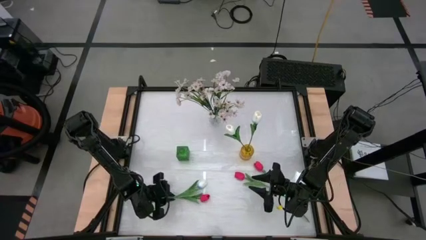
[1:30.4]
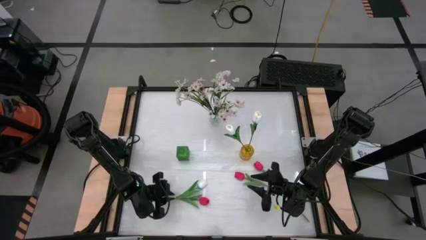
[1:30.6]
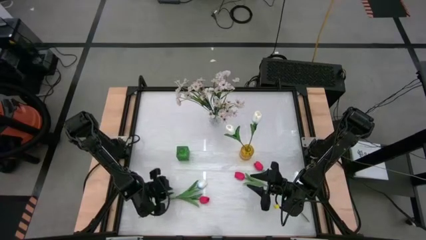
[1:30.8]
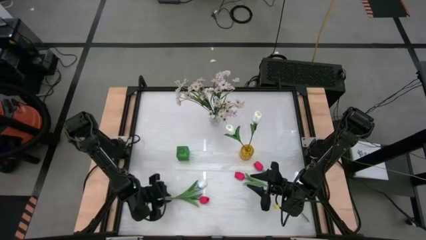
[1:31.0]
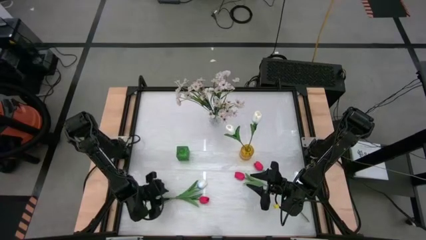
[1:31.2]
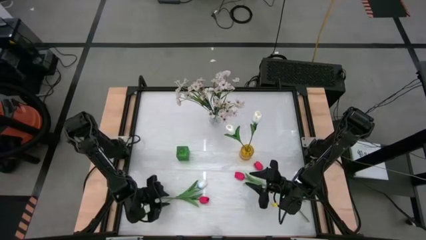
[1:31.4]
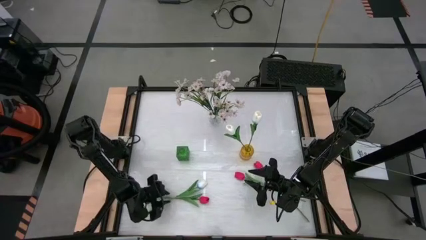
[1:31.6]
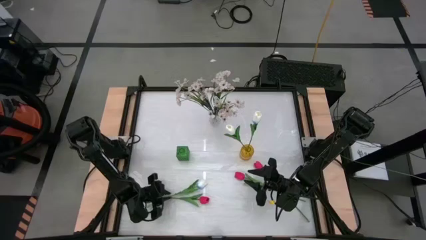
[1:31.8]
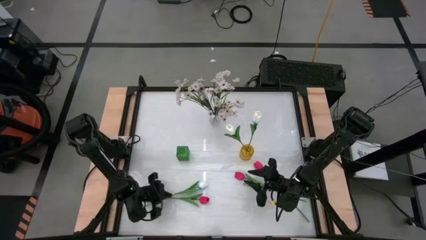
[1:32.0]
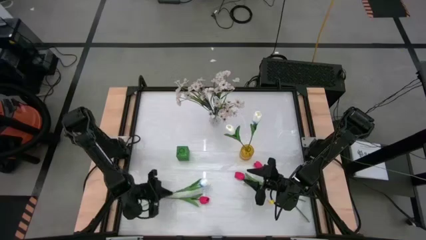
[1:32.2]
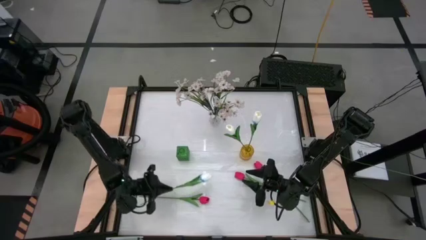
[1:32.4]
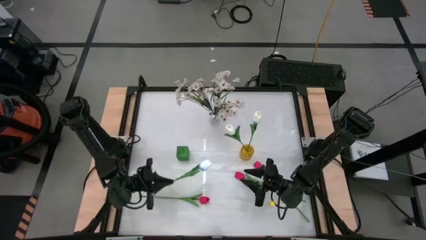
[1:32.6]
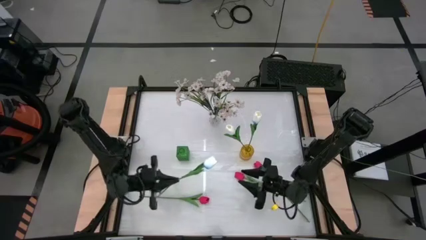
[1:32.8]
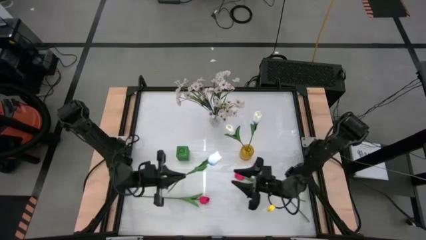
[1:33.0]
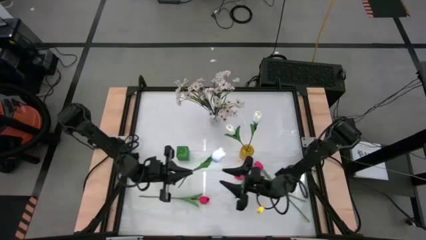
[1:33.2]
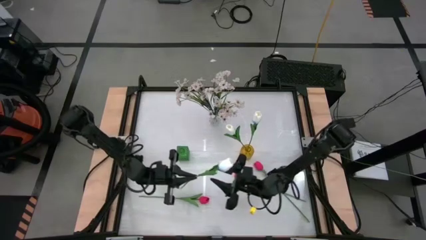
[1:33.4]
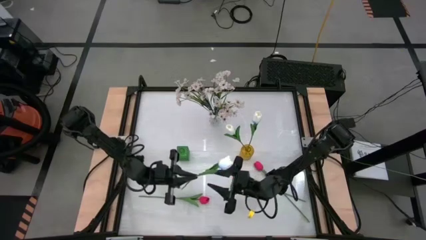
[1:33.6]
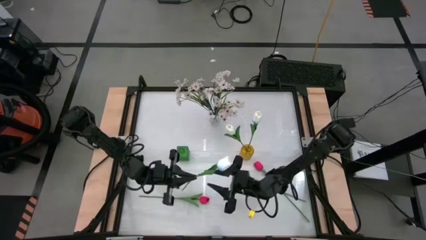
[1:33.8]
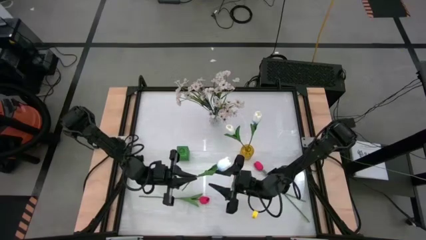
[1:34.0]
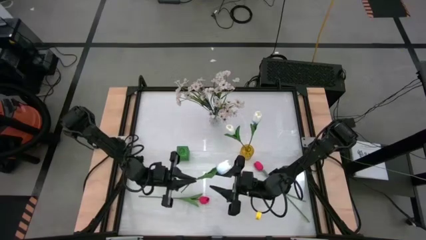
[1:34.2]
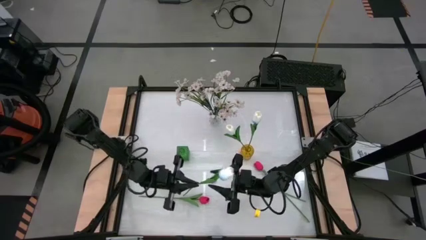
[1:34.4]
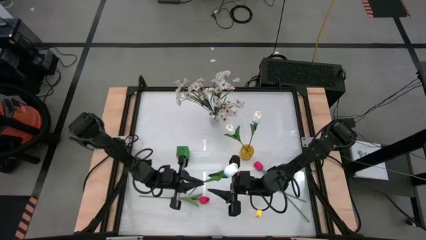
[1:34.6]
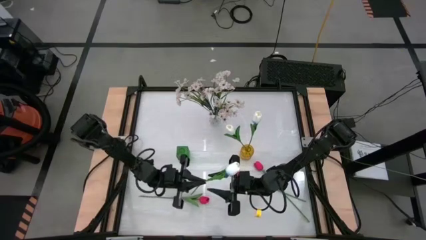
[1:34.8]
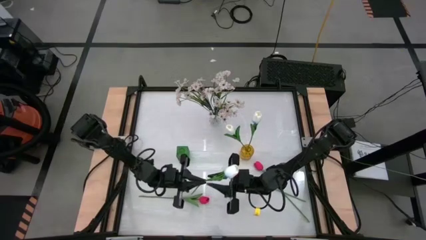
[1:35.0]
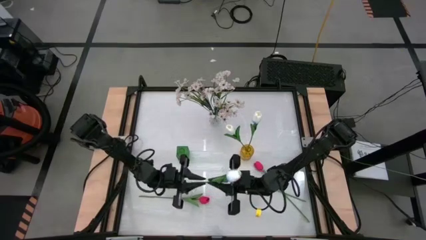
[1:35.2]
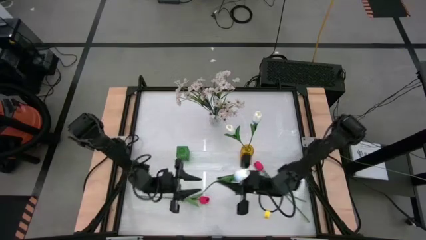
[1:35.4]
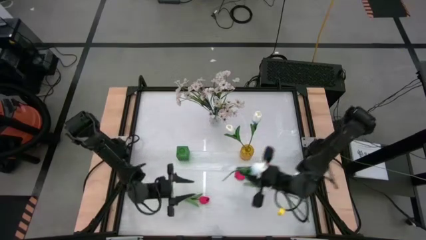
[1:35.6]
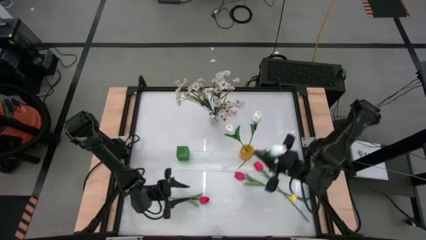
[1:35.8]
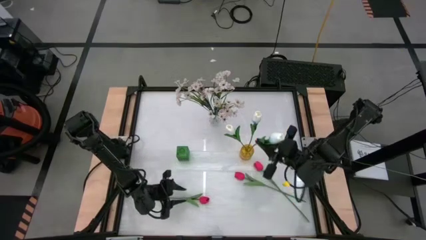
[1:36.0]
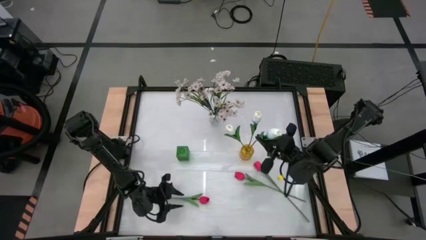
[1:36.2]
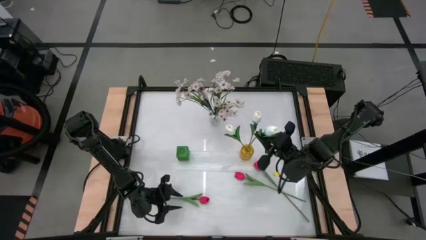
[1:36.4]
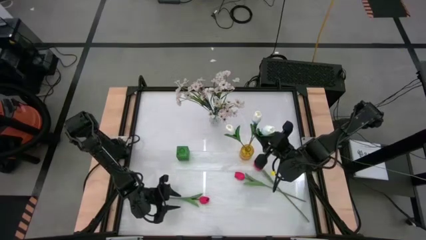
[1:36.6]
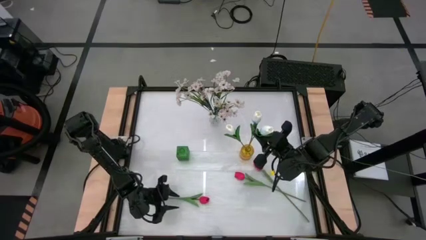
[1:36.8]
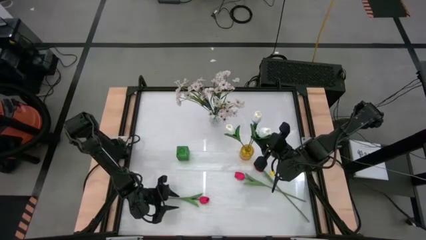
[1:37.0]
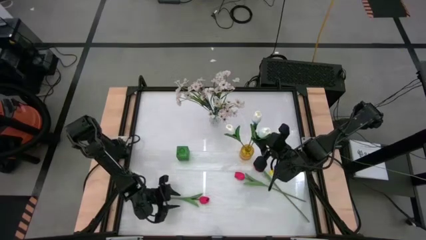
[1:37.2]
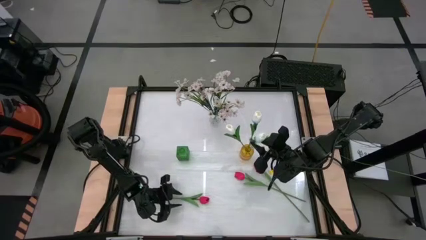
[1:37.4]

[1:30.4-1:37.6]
Task: Sort flowers into vase by color
Put the white flower into the yellow vase

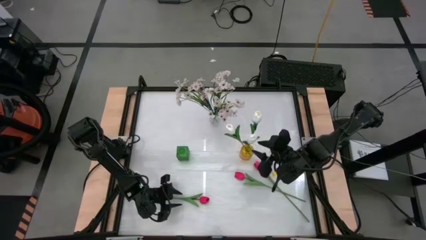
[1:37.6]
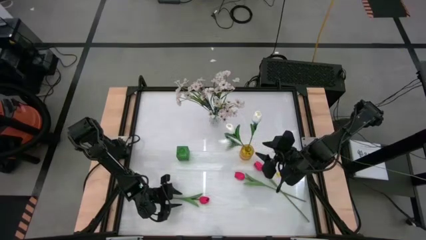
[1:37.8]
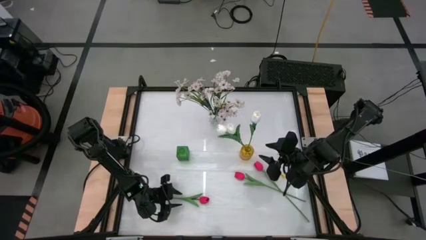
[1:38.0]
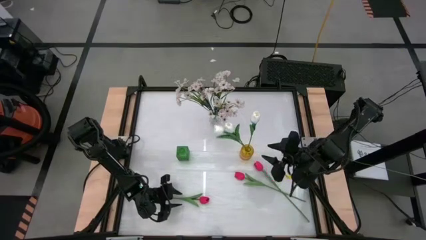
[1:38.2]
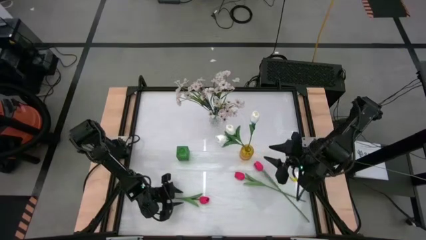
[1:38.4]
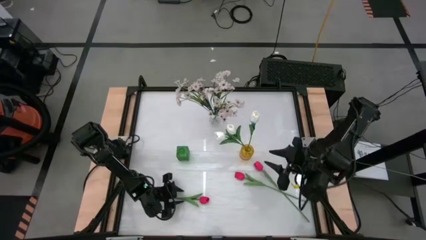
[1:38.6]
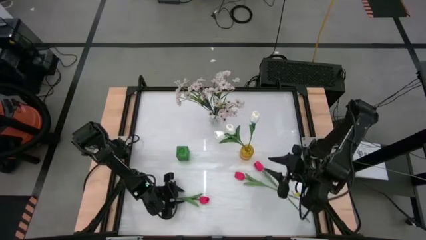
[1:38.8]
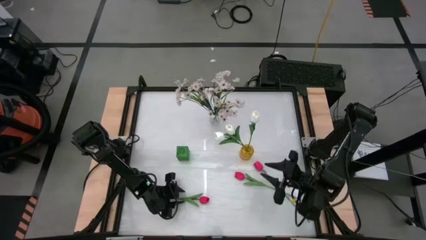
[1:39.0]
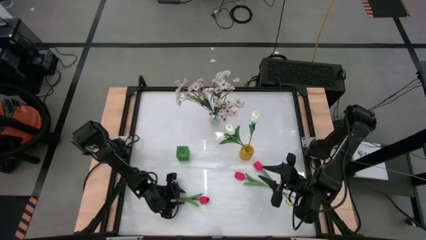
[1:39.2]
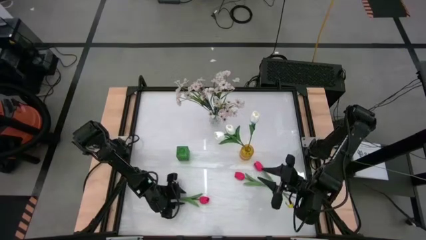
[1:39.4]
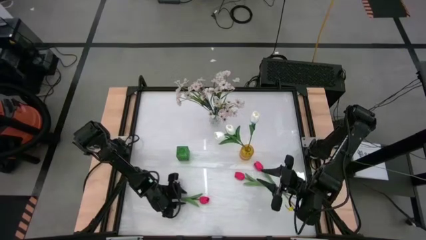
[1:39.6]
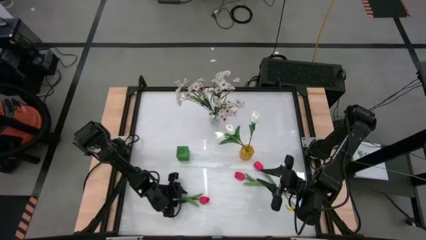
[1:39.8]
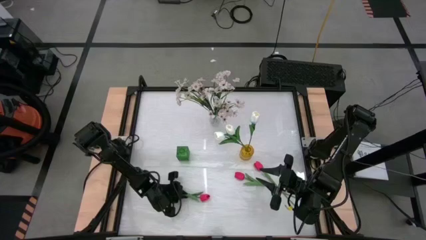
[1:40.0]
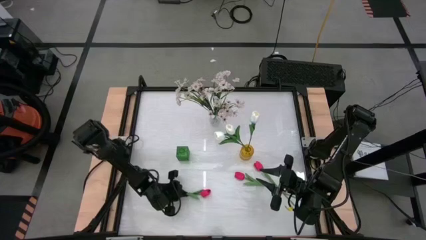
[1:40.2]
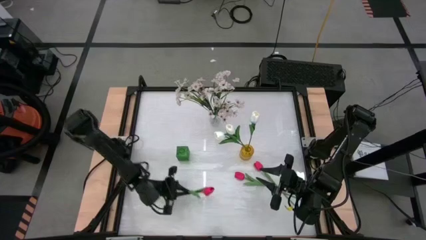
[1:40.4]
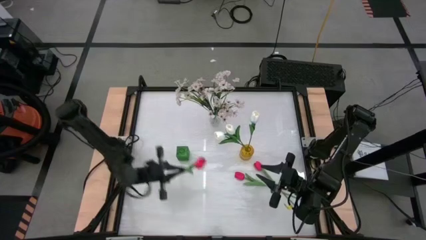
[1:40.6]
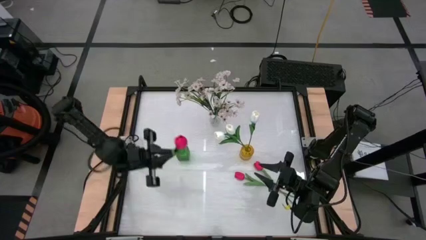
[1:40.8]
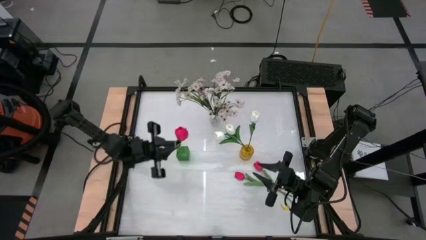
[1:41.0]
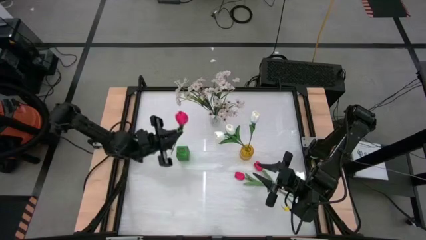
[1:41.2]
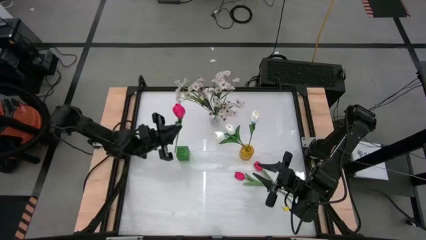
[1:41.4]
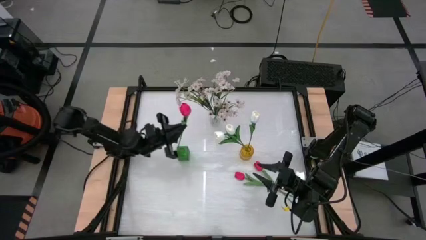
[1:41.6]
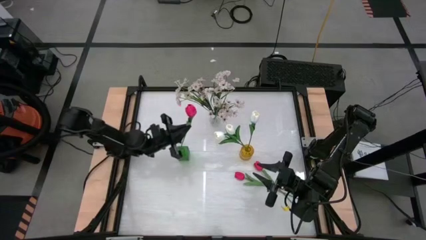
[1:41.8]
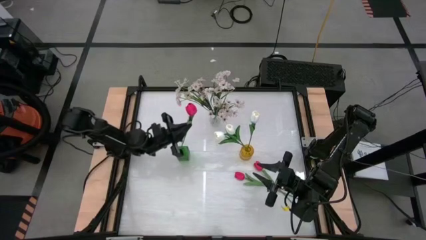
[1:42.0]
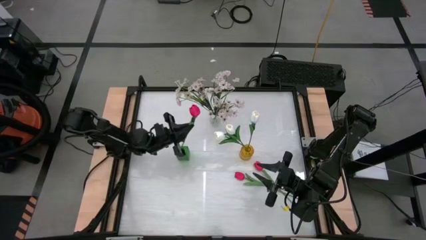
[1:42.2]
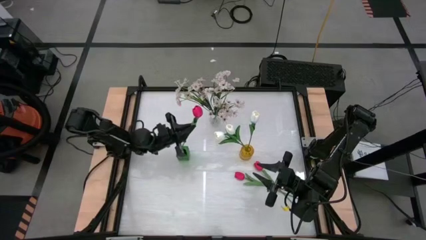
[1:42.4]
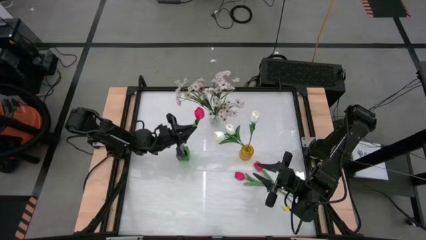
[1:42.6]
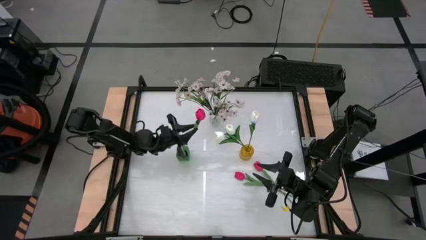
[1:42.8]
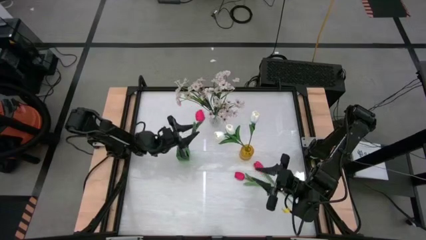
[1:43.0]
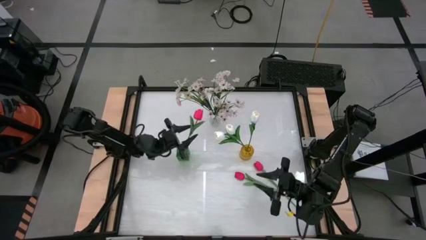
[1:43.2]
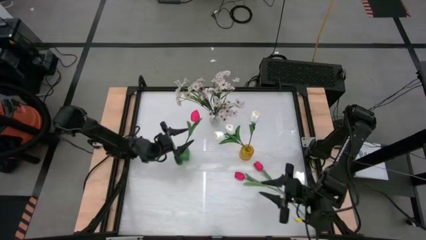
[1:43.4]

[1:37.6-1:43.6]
Put the bottom left red flower into the green vase
